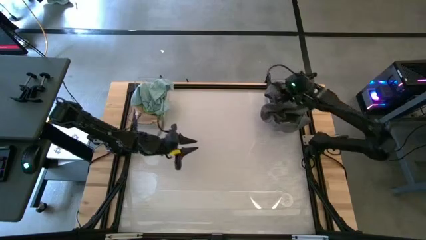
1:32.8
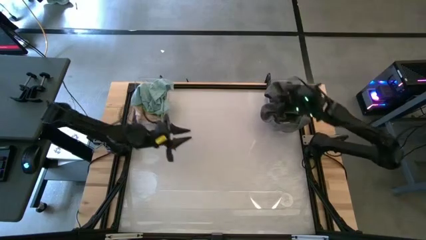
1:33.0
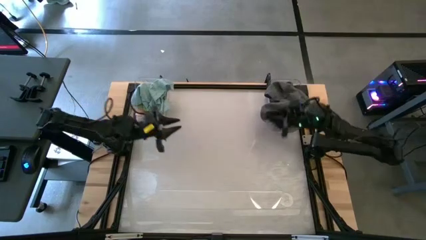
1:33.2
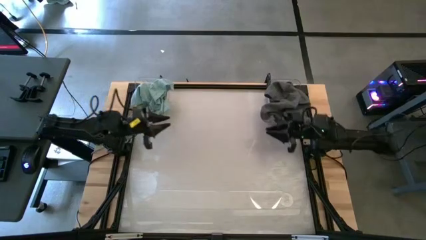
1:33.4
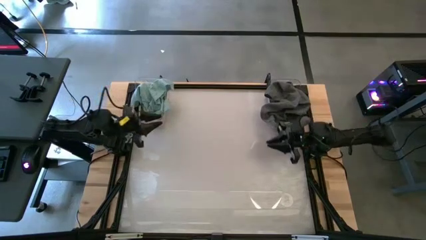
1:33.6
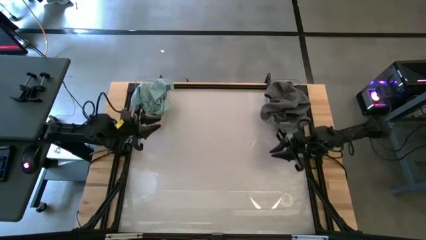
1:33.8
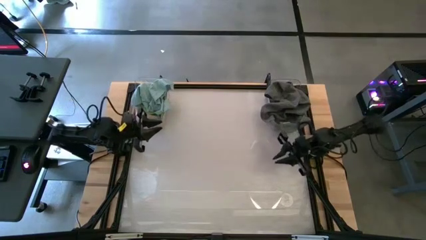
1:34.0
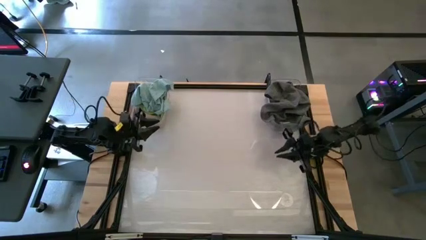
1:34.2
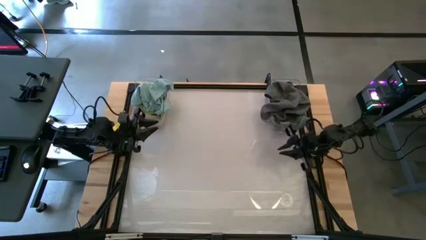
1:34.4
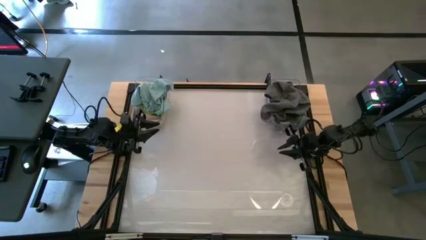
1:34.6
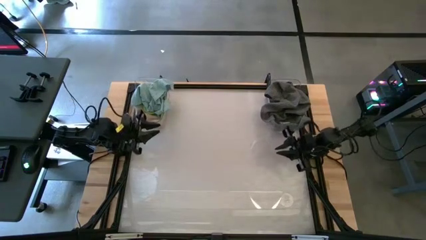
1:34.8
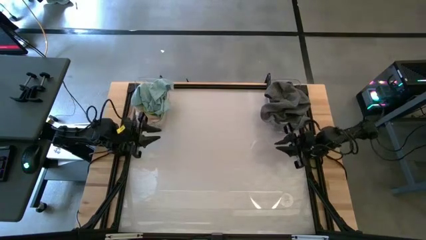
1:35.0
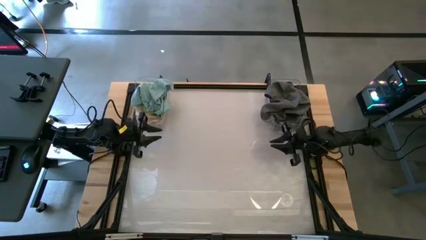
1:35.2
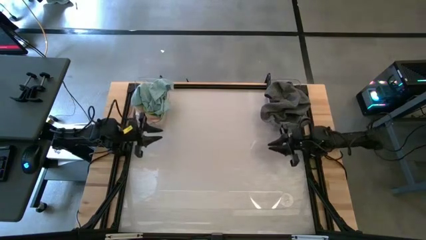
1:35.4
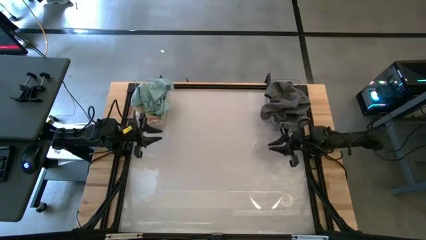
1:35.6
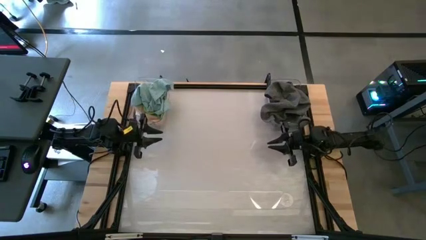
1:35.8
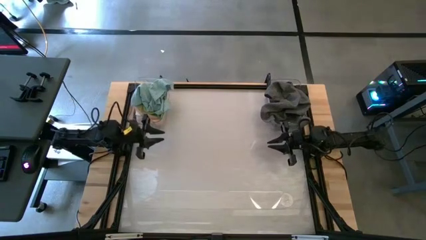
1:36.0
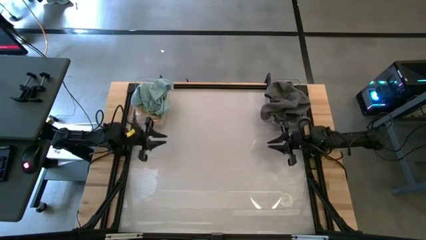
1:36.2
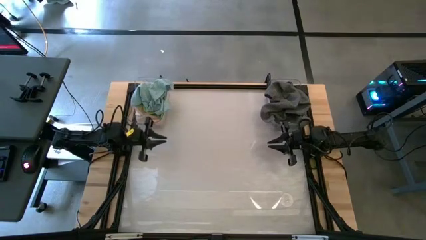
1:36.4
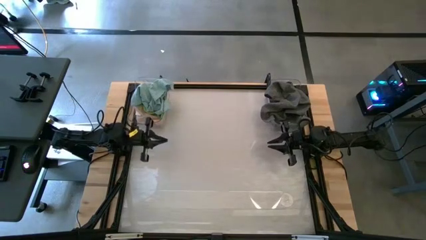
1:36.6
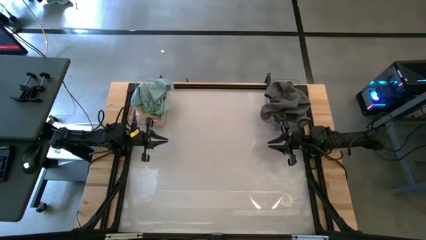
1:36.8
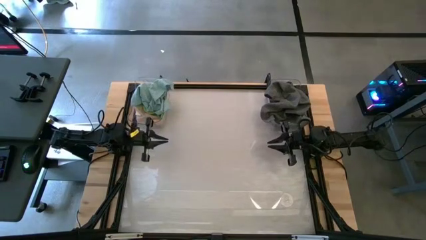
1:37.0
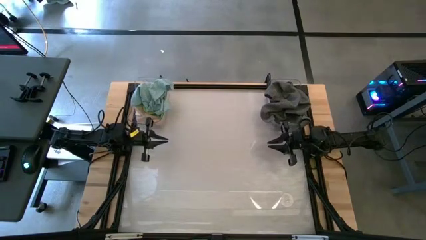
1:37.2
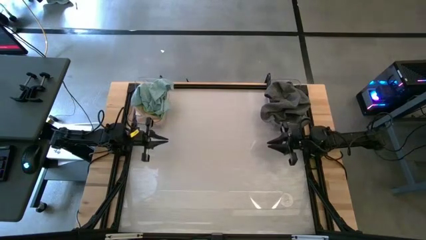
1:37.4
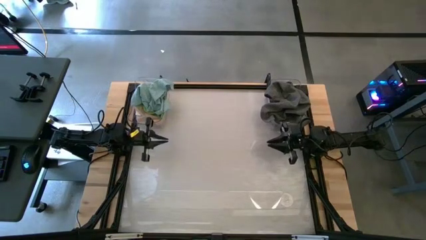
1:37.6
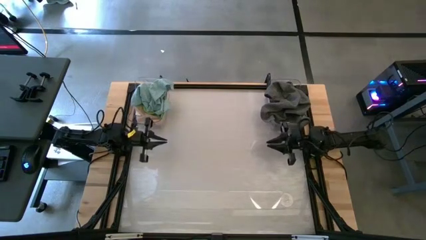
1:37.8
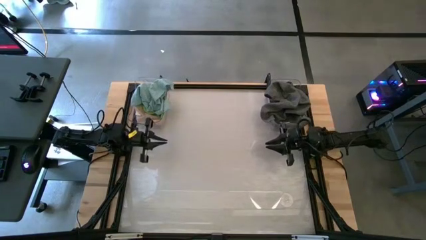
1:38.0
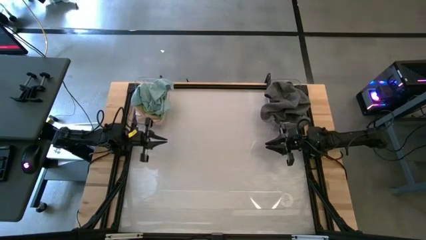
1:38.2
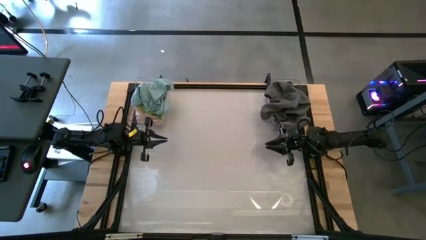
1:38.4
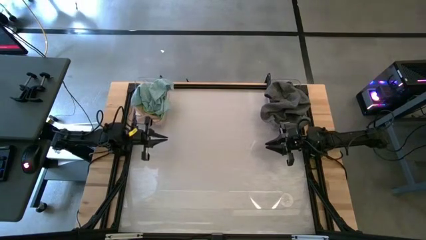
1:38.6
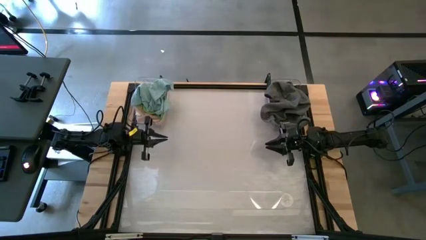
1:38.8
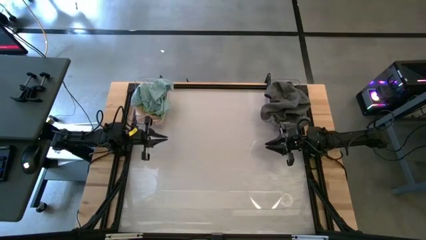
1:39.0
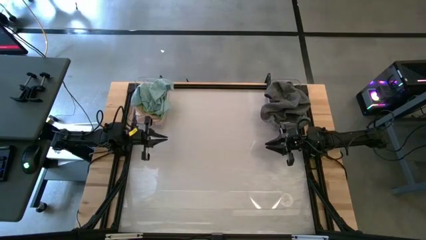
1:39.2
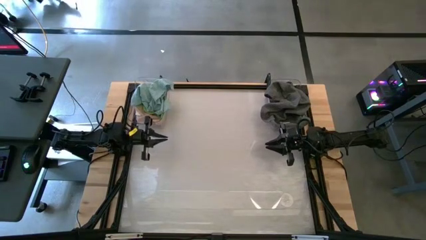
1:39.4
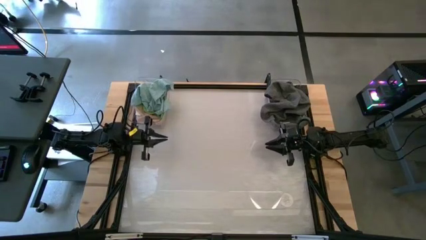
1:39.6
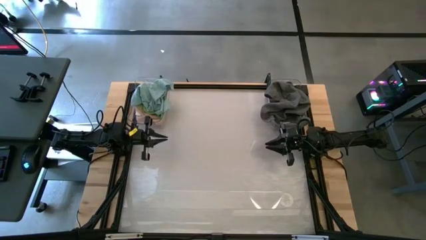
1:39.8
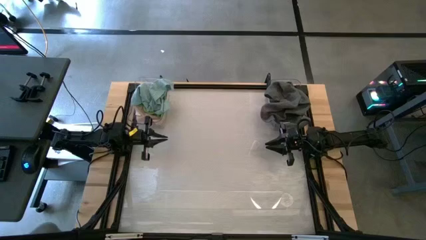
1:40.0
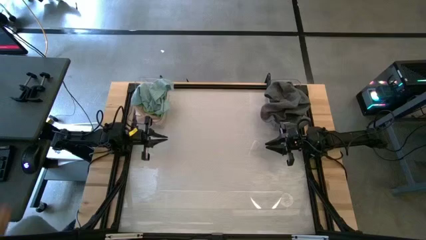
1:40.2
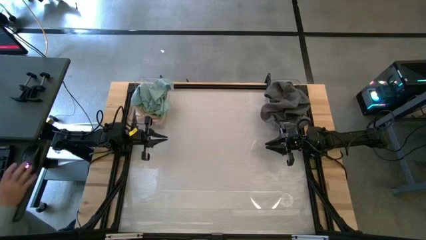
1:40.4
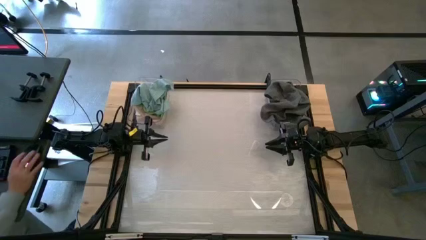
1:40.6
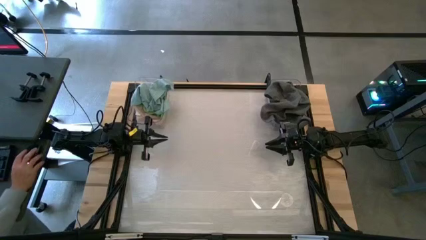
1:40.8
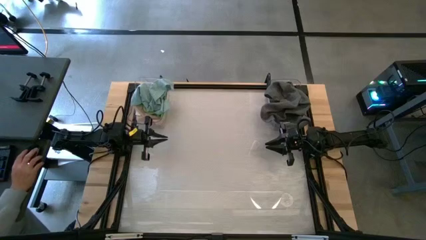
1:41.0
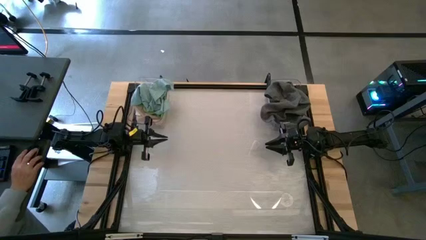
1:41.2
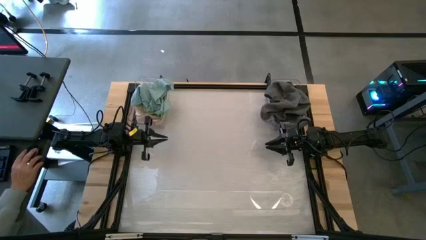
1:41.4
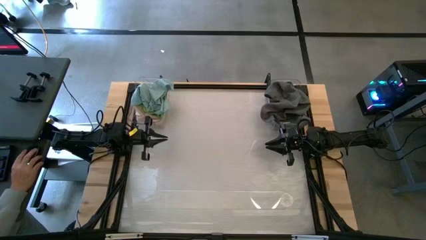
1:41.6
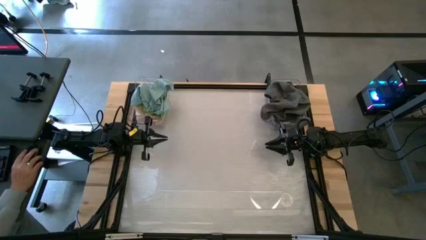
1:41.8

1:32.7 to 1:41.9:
Task: Sort towels by color in basket
Return to Home Position

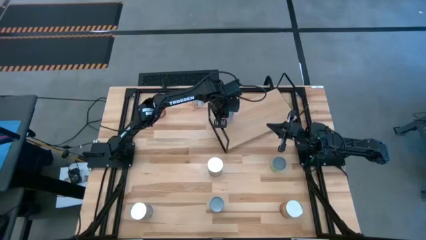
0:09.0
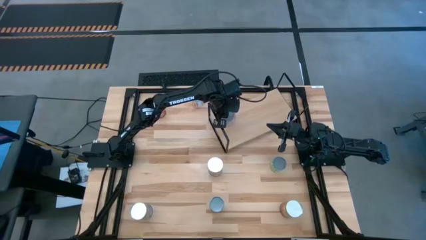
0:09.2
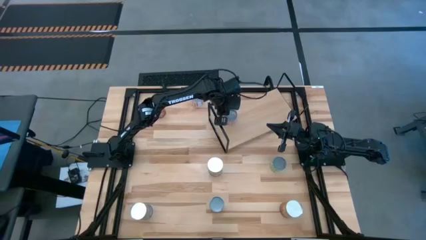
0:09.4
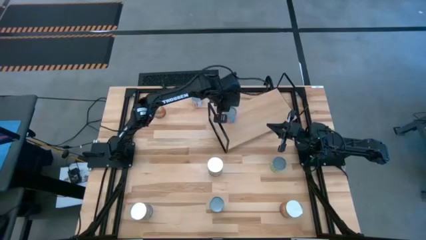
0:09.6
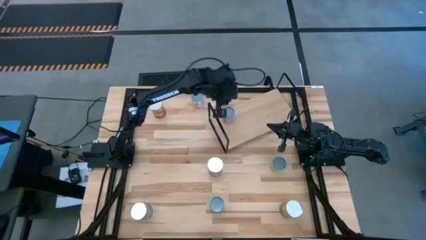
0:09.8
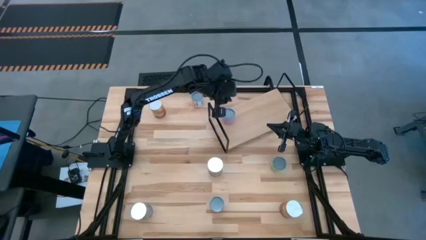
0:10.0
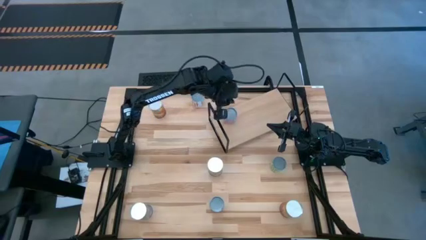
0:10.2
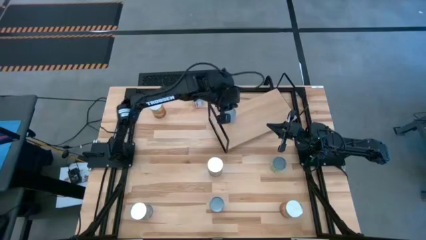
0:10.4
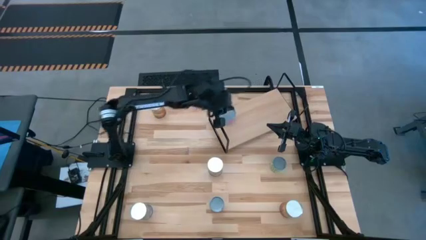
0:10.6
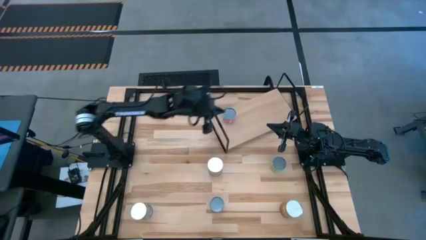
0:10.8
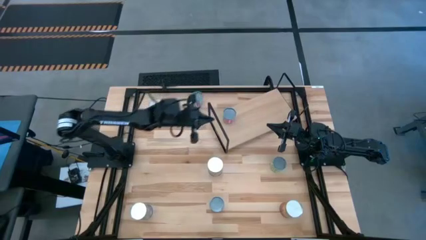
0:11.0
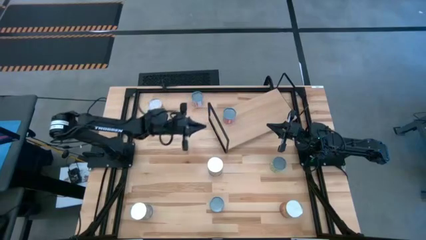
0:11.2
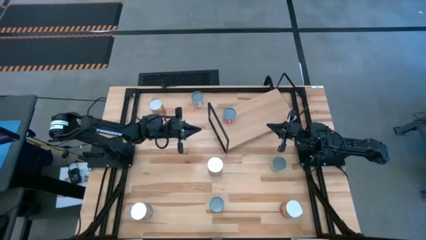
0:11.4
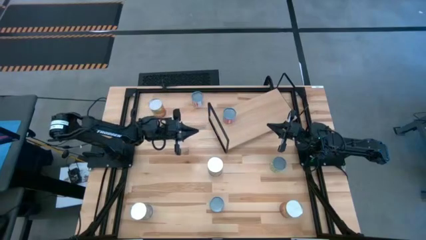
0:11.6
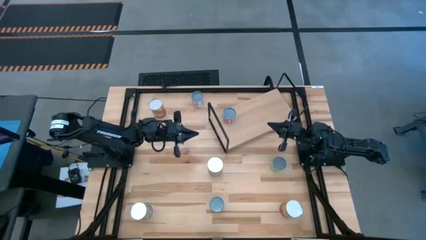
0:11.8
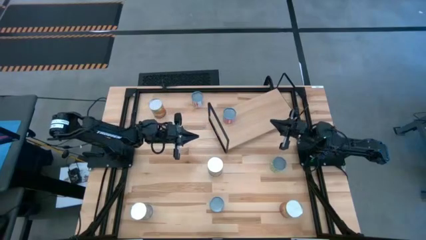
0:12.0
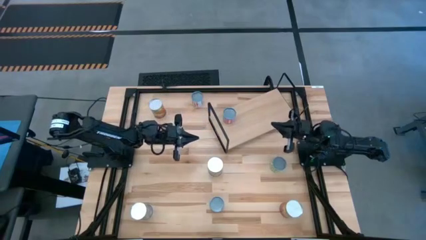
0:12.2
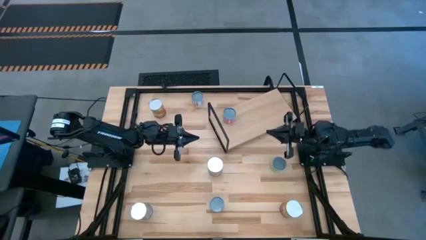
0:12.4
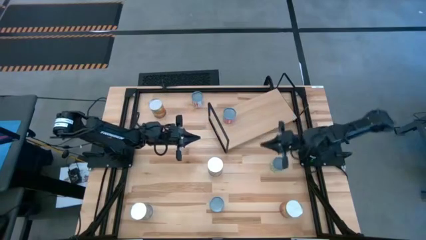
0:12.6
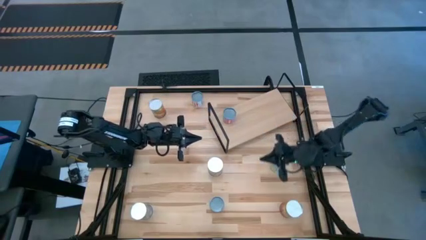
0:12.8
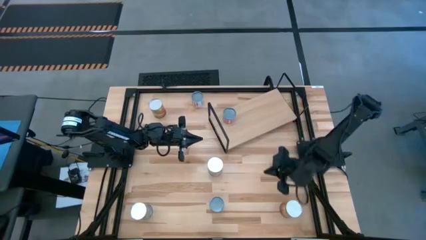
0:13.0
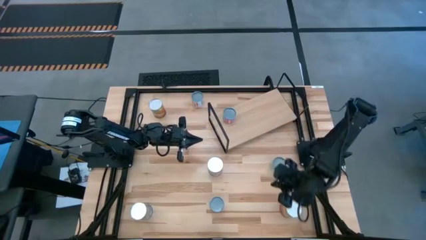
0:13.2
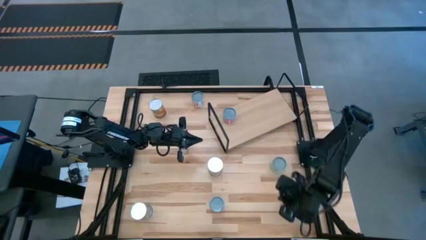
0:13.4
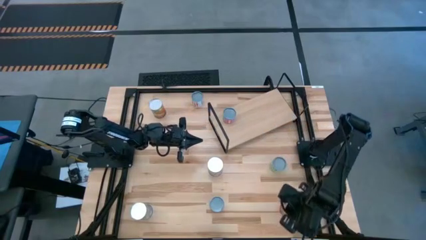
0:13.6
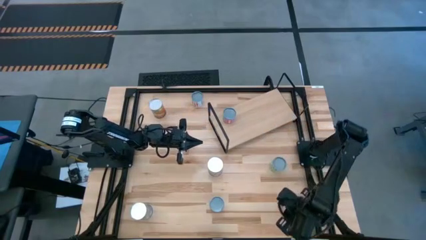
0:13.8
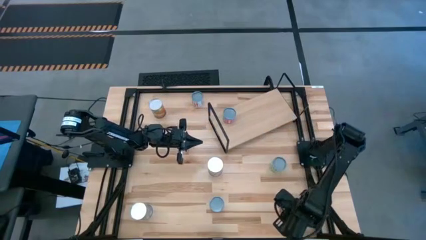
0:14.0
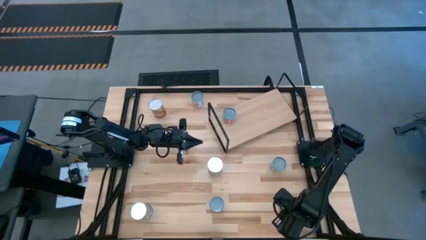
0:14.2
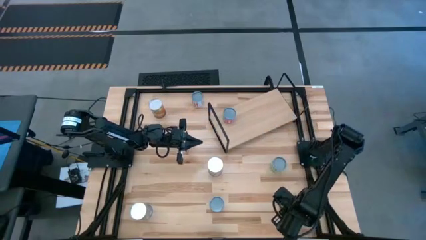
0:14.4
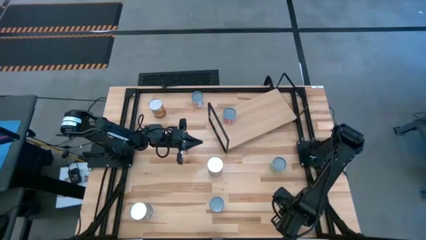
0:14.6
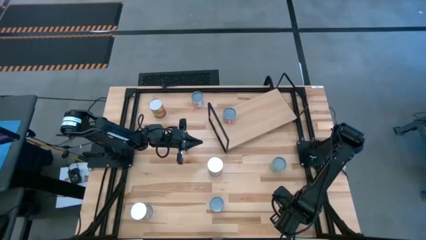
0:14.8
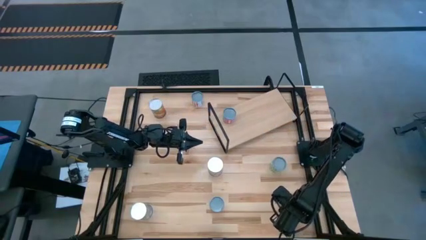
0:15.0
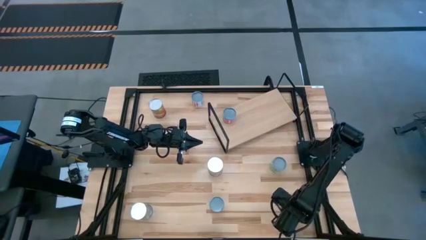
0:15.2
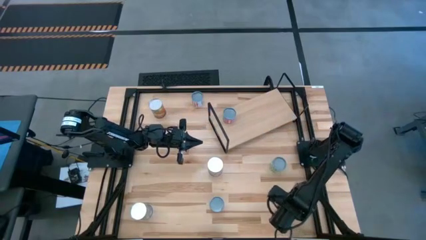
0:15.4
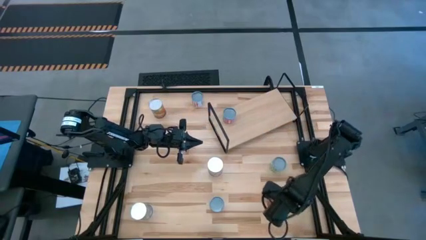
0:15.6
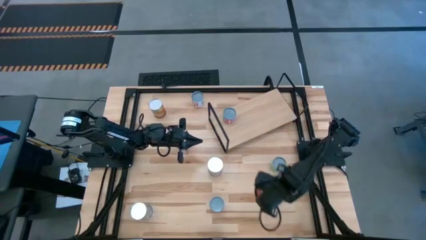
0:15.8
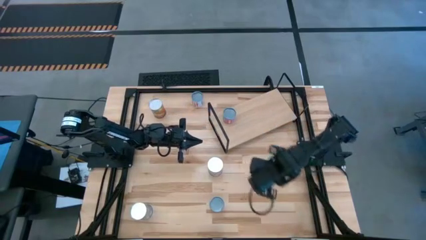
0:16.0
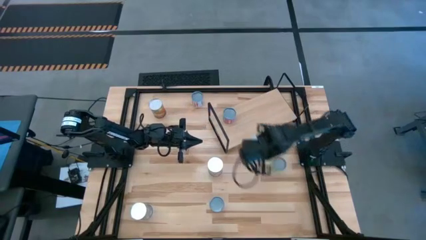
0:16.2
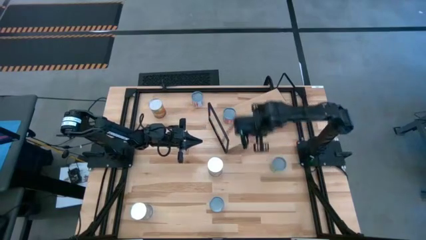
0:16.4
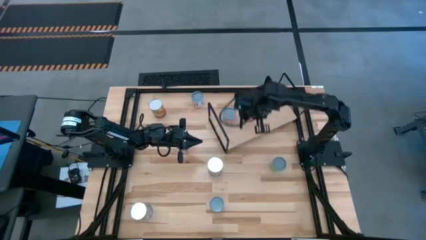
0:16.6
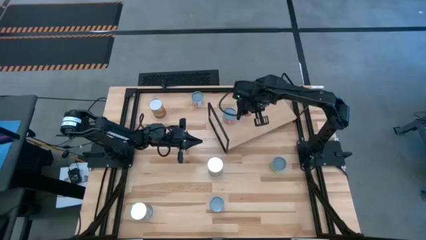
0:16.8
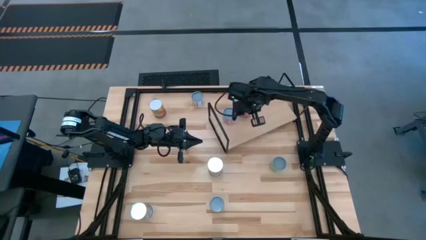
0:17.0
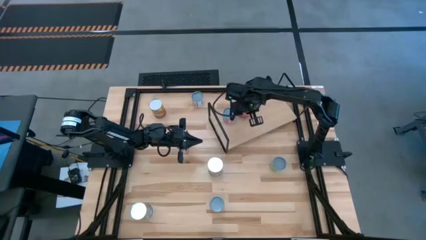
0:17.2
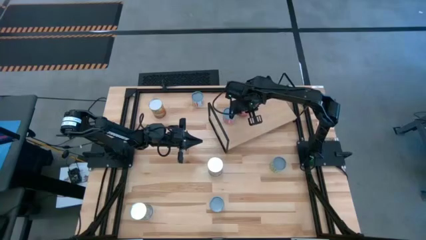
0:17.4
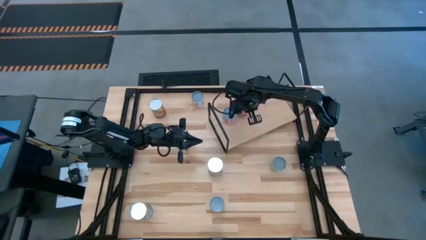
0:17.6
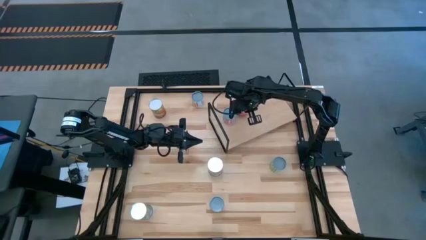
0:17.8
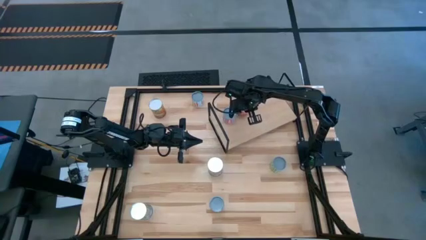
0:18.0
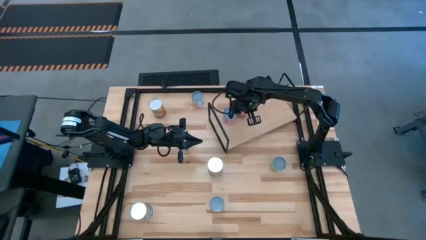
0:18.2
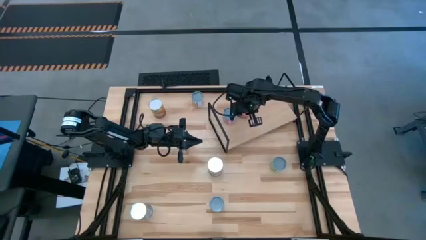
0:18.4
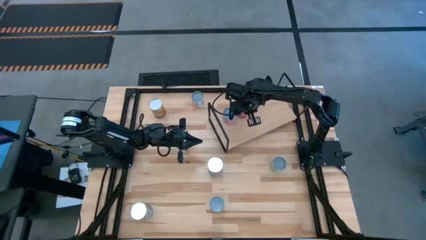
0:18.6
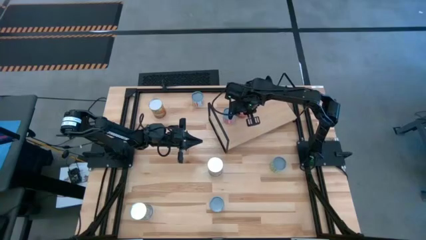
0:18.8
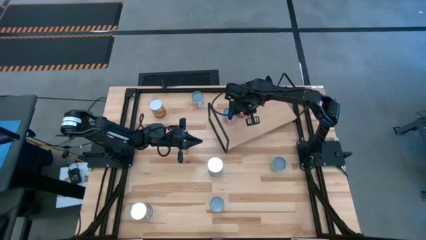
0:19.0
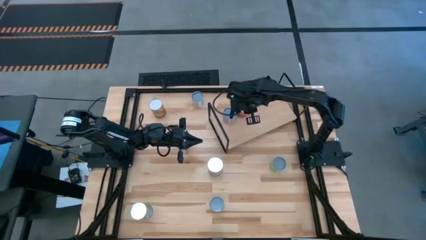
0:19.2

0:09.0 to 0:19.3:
Task: Pick and place cans onto a shelf
Put the bottom canned corn on the shelf
